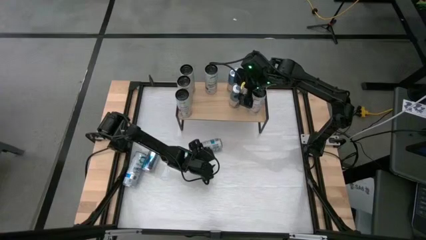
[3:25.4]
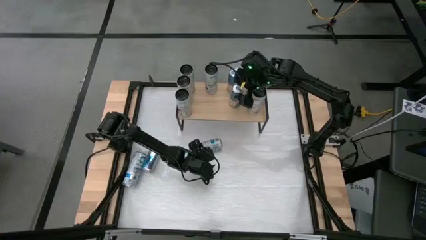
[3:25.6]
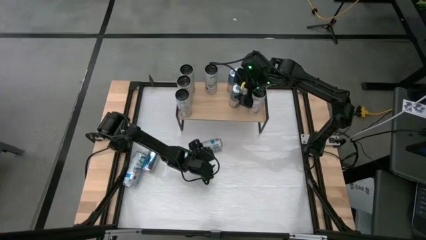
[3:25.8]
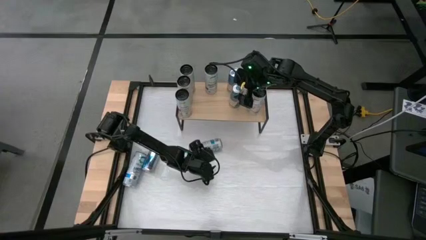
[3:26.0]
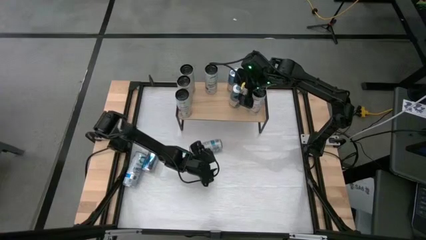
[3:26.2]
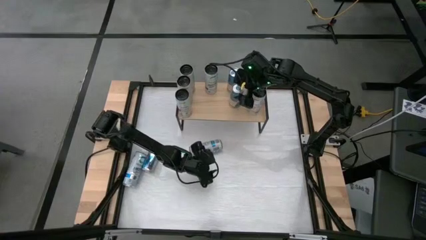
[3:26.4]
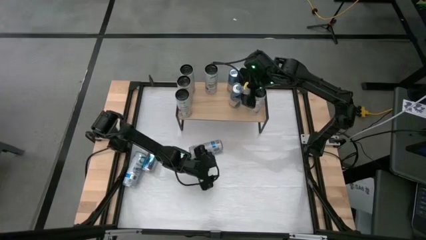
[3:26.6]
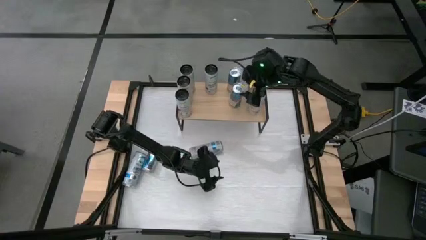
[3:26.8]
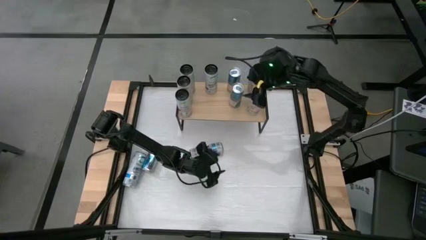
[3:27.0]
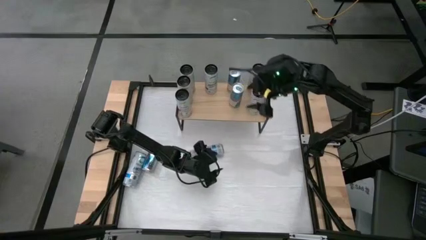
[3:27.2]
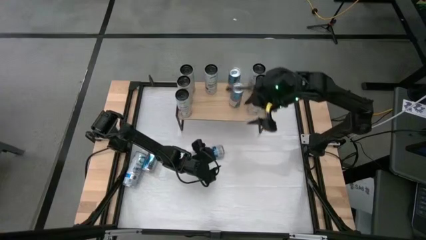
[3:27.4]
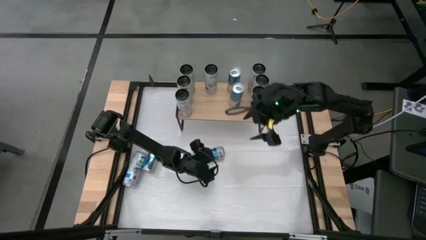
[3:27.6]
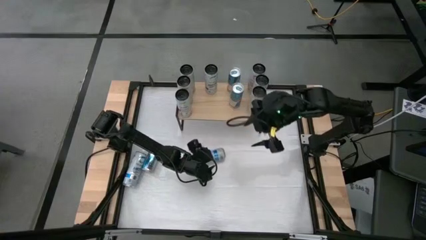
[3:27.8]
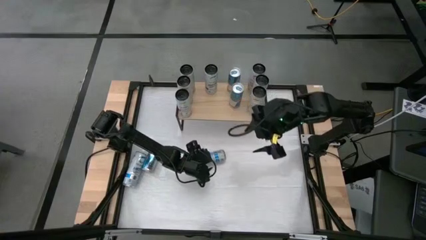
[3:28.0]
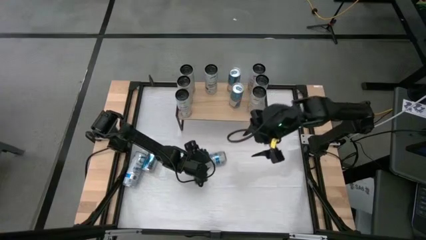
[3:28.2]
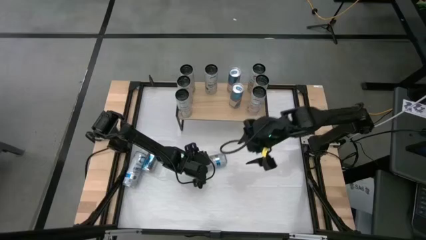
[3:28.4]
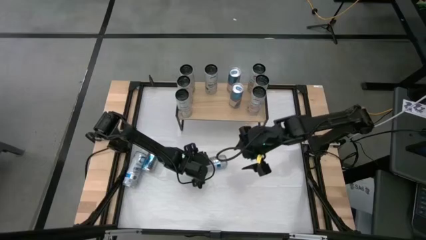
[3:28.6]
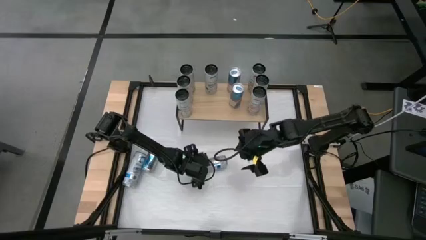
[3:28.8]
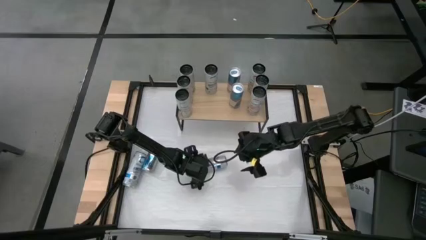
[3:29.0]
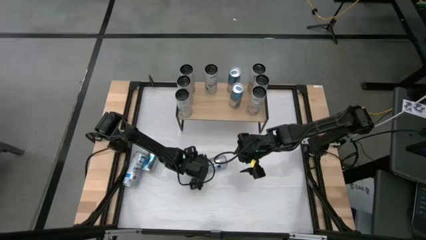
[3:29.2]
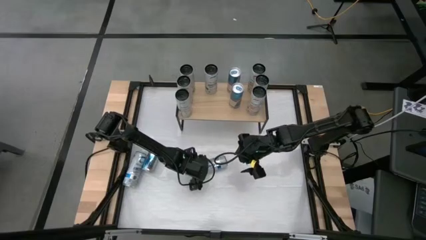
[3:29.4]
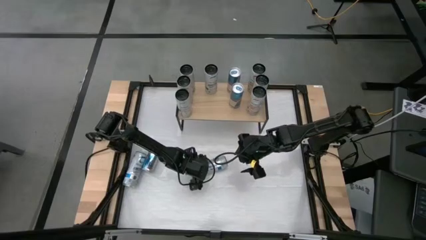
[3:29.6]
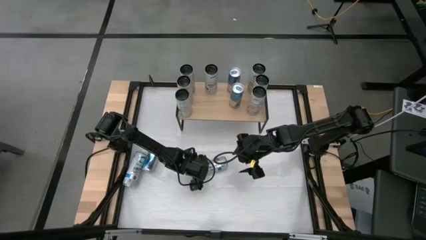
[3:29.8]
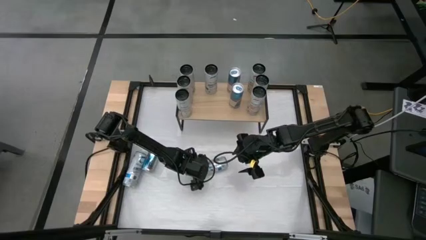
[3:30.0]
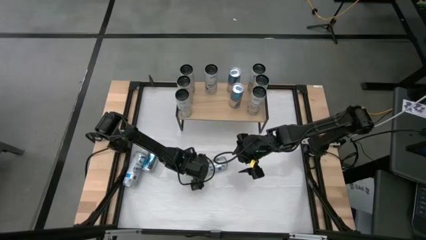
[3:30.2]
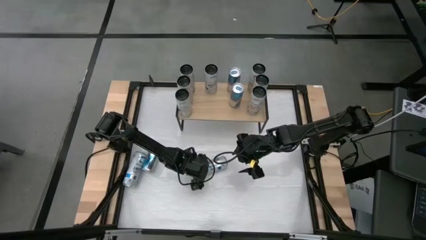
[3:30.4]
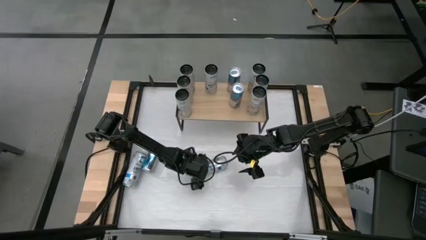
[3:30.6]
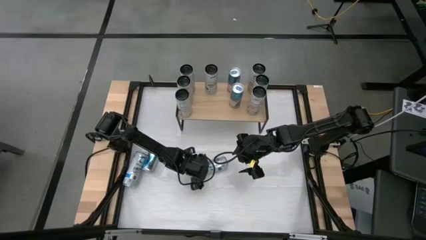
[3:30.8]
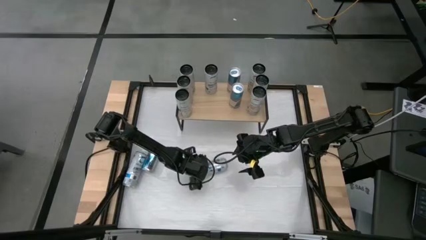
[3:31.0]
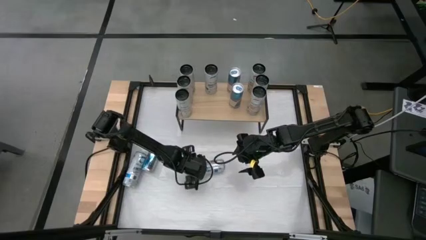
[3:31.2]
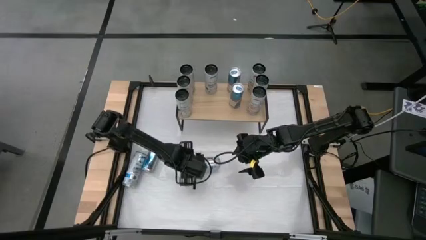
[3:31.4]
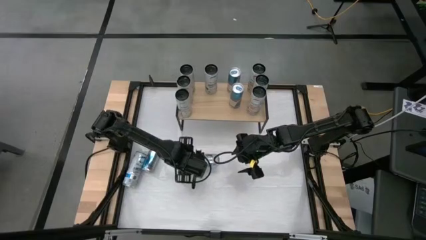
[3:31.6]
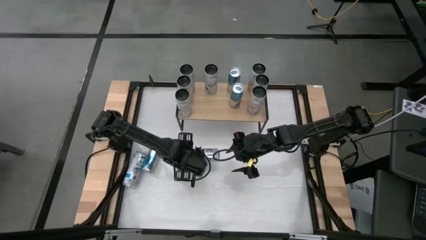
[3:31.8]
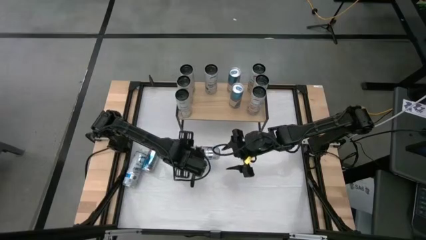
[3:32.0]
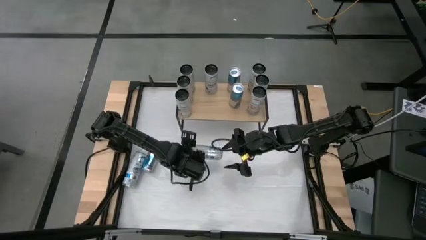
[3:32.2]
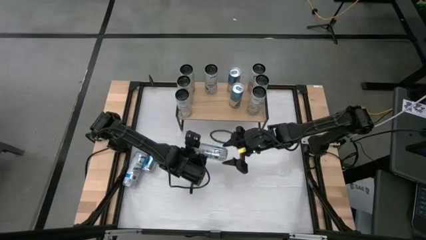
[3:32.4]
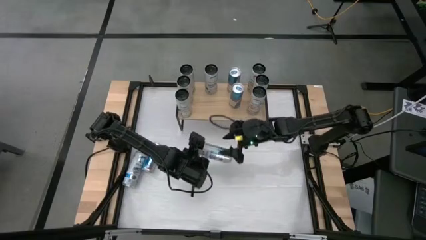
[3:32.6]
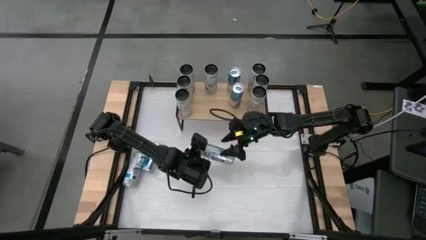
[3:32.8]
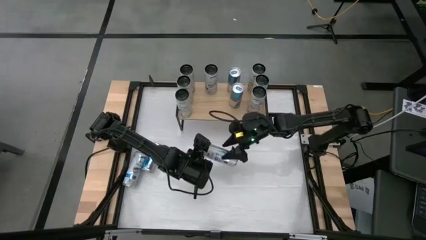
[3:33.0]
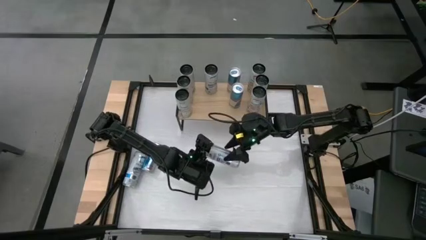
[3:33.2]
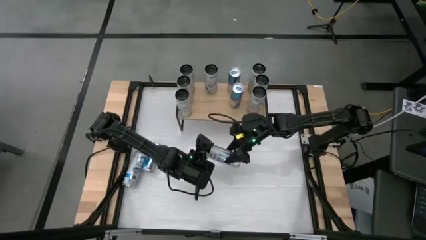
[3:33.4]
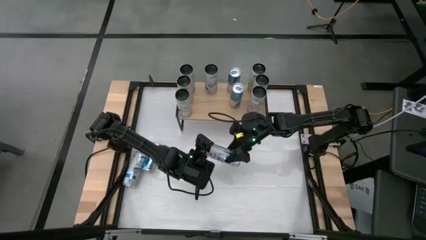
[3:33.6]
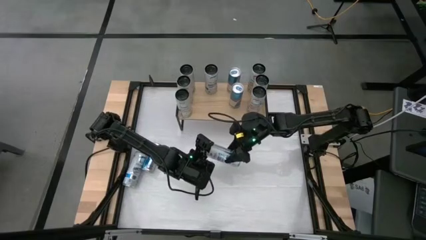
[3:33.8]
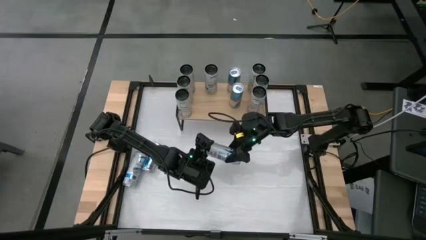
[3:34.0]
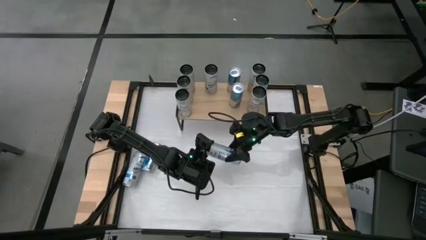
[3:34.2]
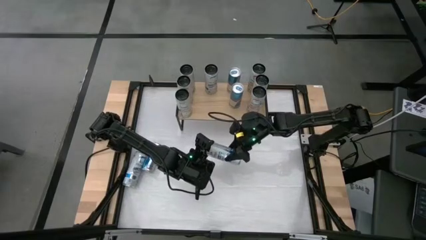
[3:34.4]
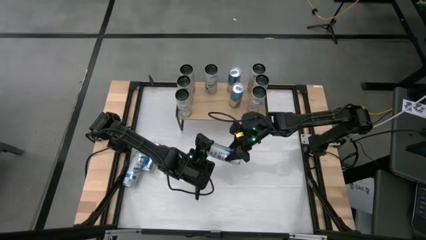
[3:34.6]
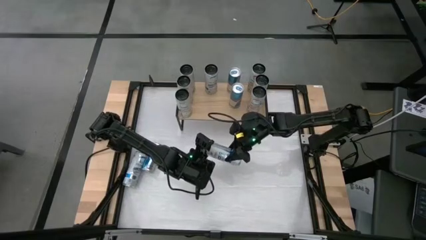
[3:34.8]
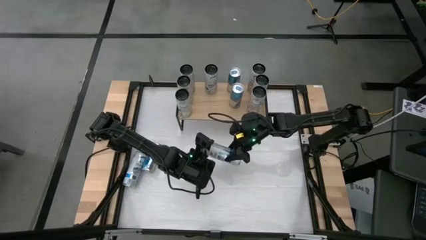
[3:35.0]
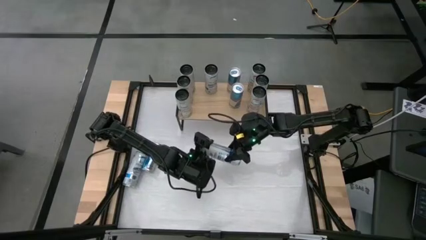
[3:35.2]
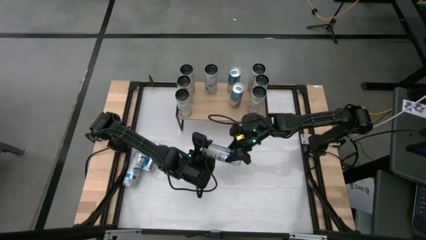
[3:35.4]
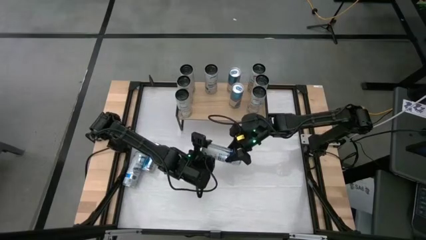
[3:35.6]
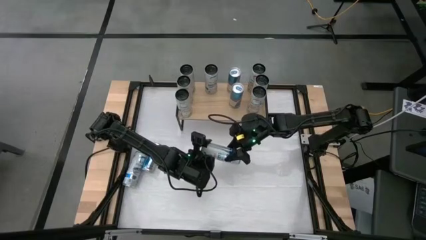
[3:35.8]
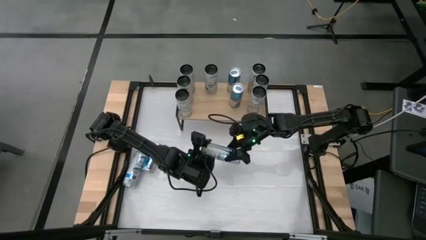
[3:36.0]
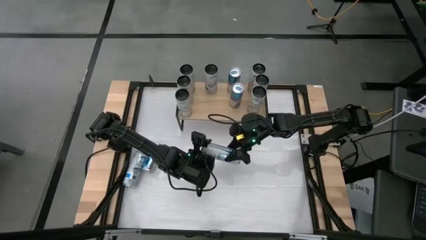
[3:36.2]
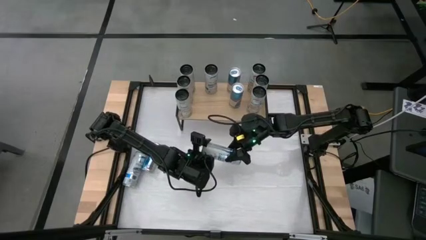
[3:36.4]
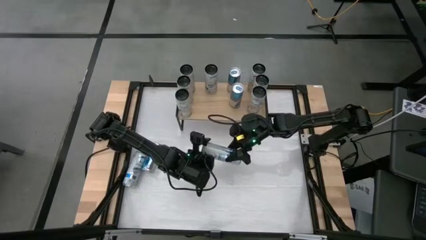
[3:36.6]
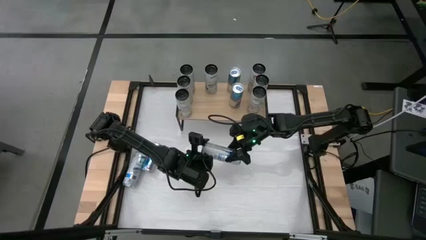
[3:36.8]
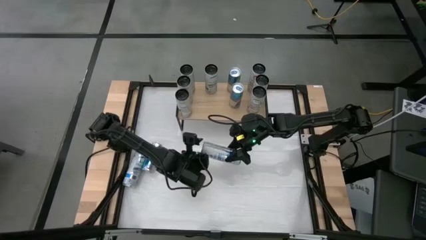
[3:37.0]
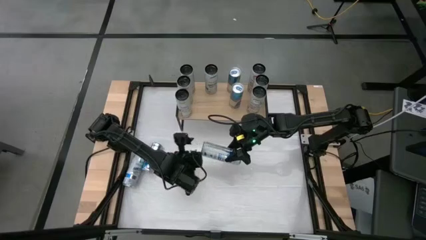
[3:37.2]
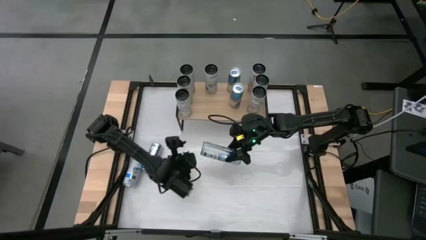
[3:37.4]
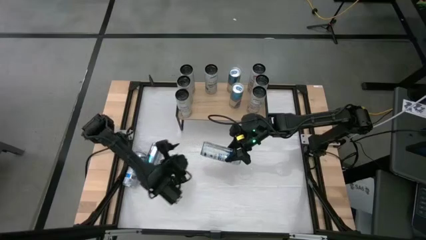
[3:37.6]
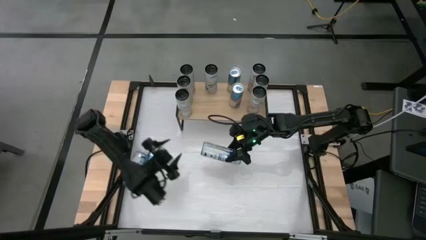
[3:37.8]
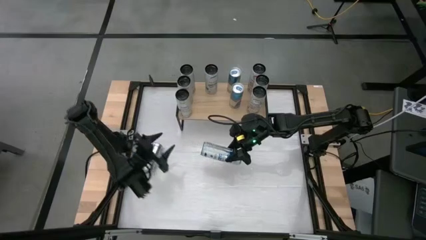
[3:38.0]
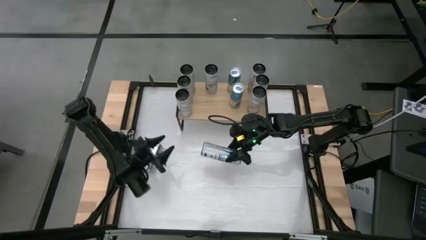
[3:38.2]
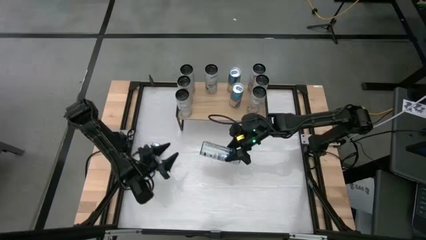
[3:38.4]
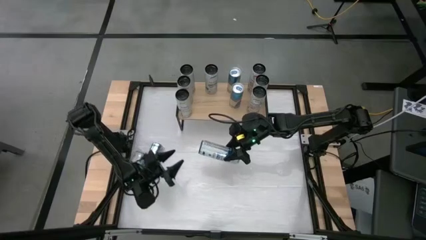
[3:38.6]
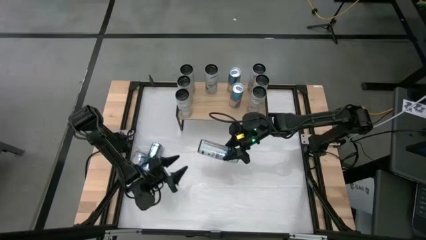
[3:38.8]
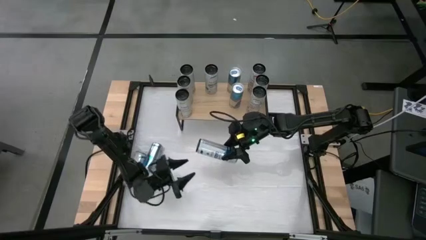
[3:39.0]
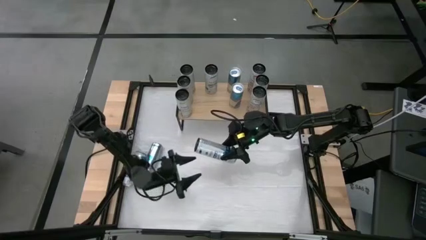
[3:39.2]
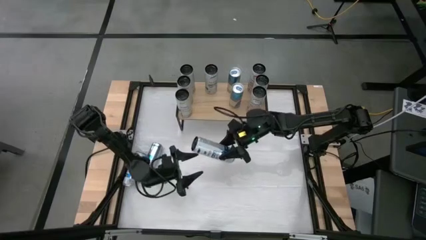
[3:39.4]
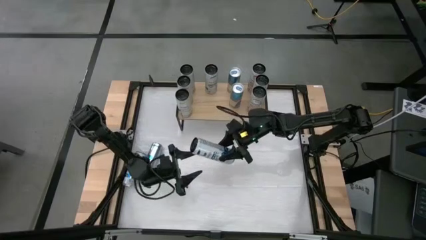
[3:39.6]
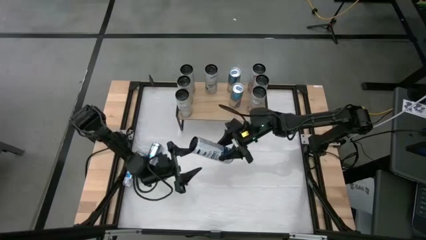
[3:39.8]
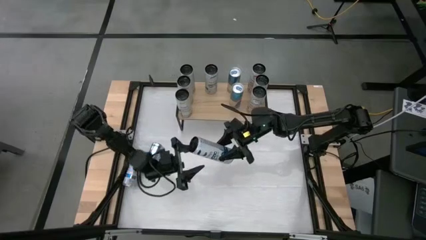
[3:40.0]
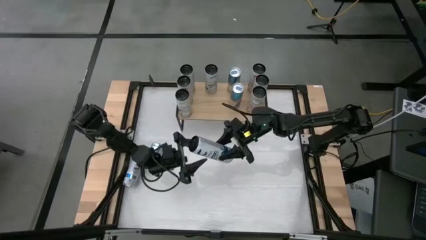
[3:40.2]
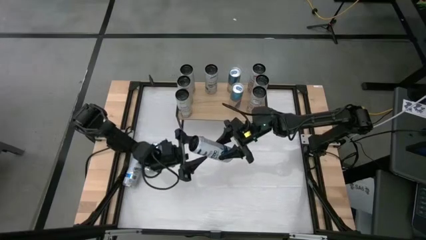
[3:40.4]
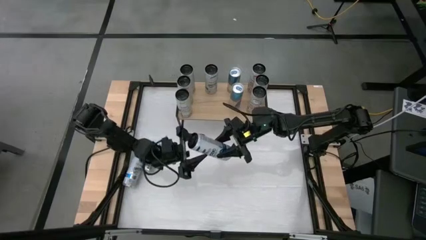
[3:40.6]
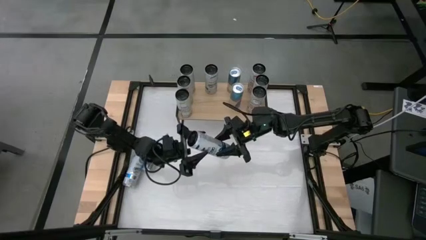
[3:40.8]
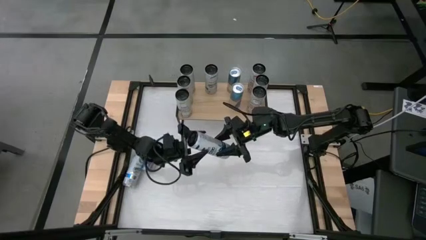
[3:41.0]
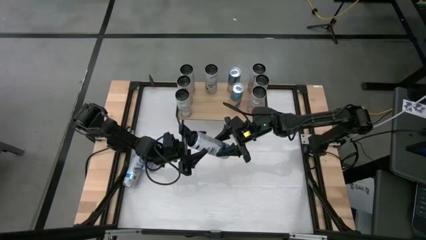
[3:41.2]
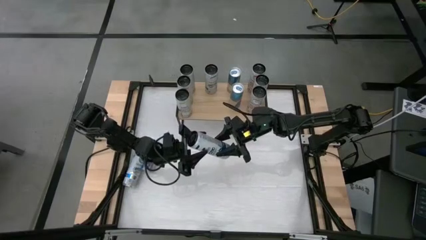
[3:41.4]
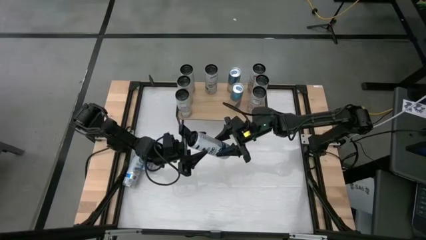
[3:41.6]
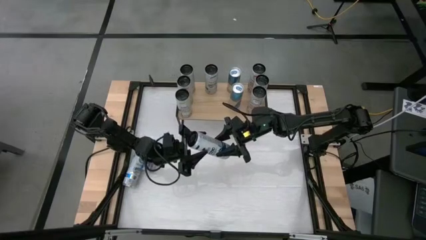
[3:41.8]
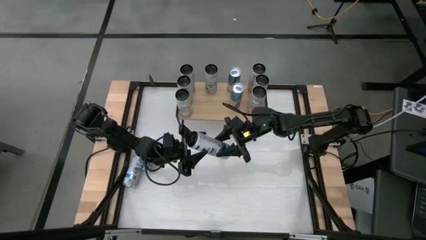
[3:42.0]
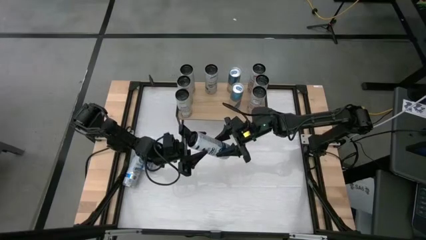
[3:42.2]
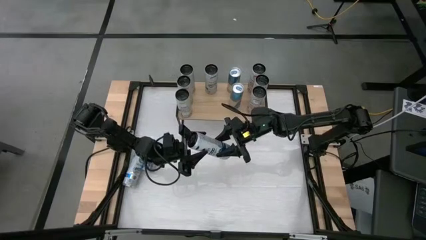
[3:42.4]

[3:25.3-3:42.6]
Task: Sort soda cans
Put the right white blue soda can on the shelf and align with other white blue soda cans
